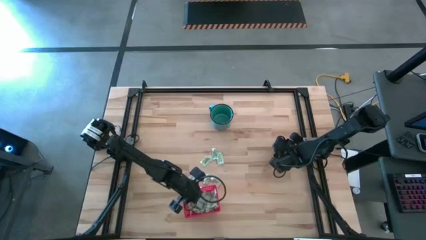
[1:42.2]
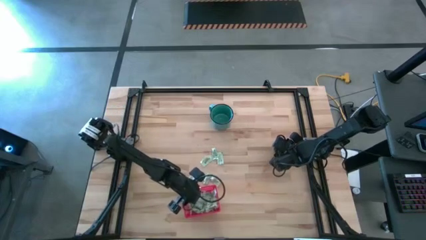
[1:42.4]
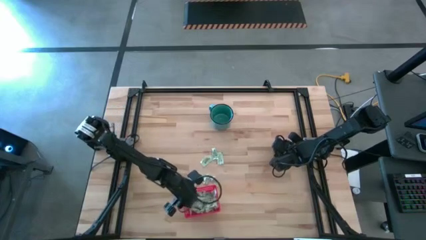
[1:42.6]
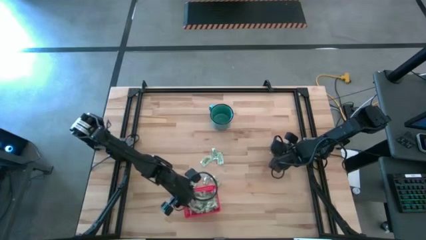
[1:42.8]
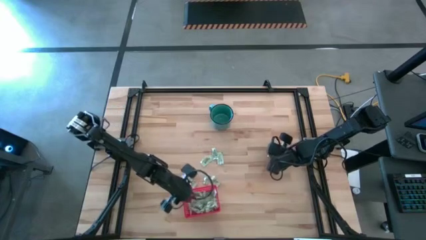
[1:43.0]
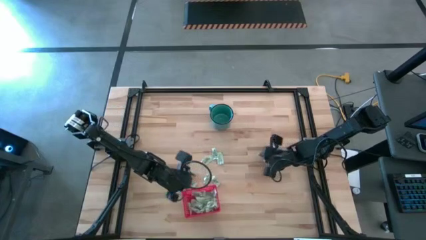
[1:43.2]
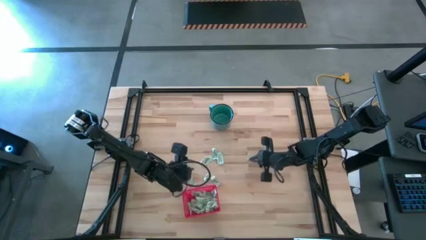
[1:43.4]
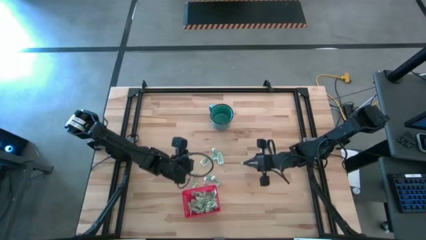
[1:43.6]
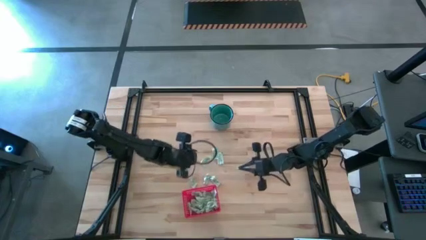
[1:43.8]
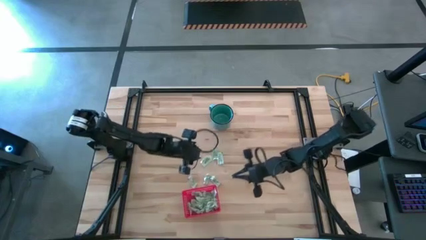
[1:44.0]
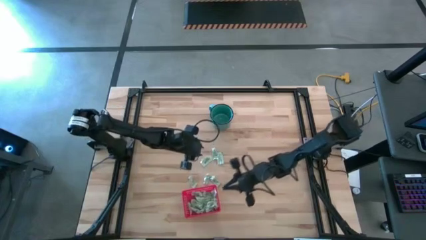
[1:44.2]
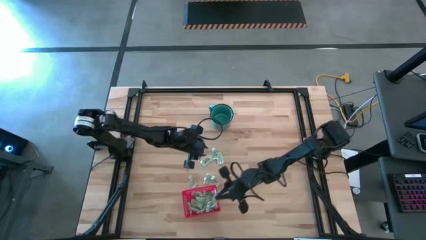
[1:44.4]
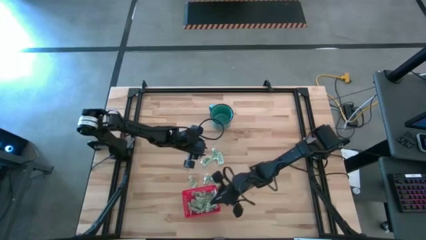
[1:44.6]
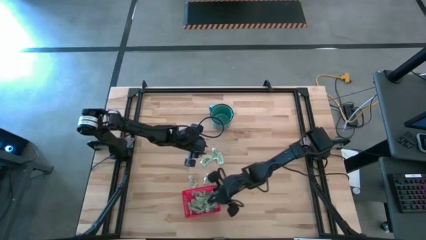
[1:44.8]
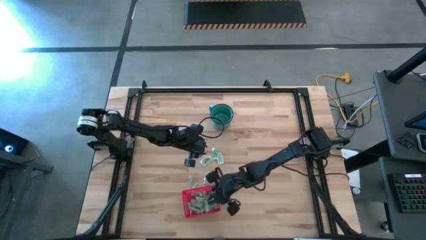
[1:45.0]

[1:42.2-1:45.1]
Task: Pick and place items into bin
Put the green stevia packet into the red bin

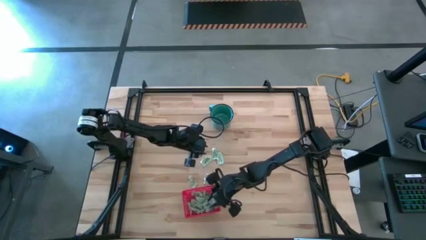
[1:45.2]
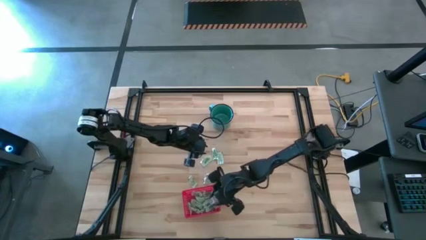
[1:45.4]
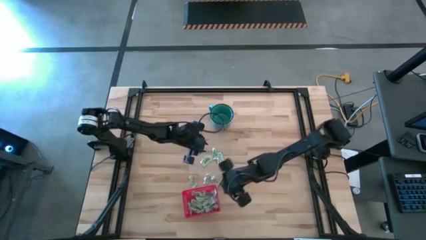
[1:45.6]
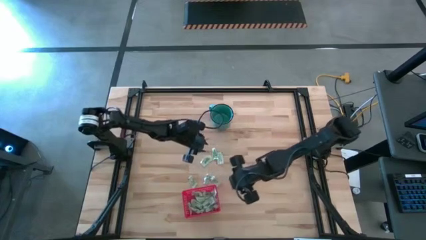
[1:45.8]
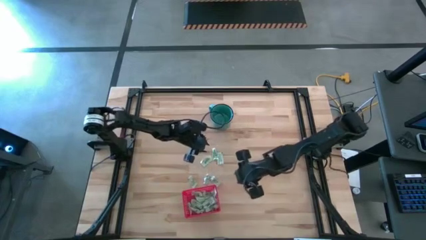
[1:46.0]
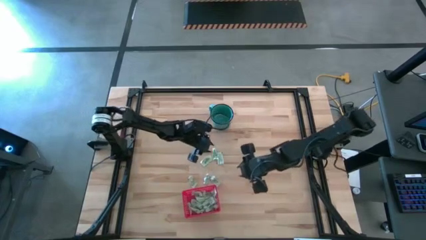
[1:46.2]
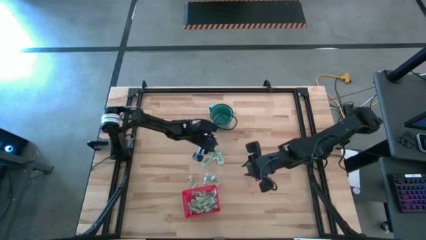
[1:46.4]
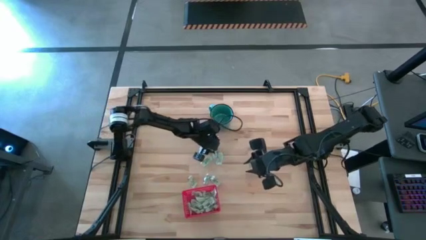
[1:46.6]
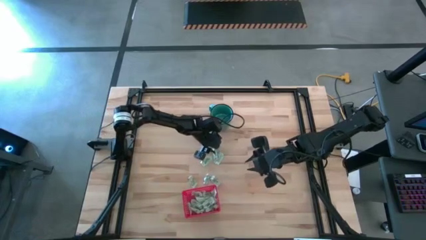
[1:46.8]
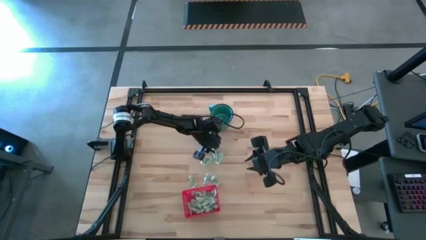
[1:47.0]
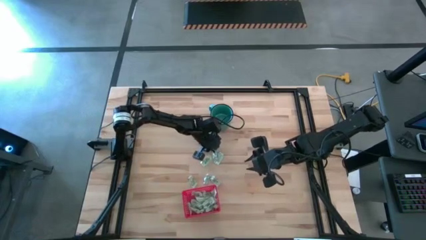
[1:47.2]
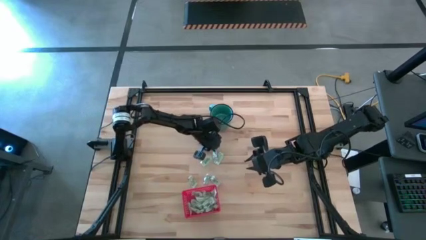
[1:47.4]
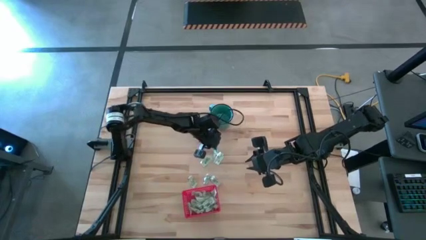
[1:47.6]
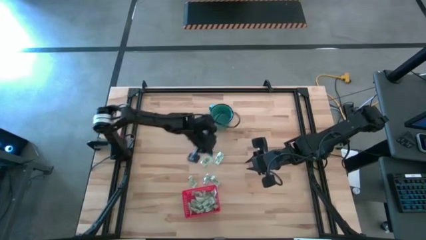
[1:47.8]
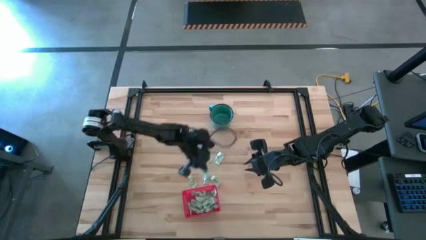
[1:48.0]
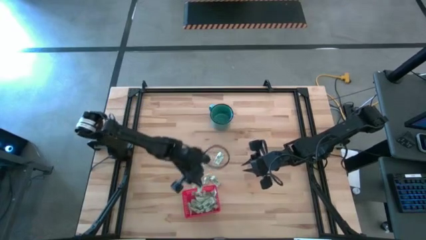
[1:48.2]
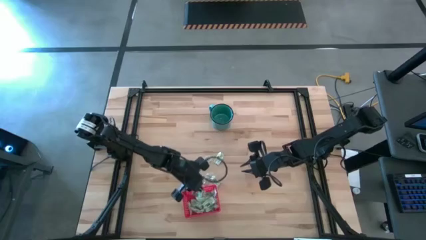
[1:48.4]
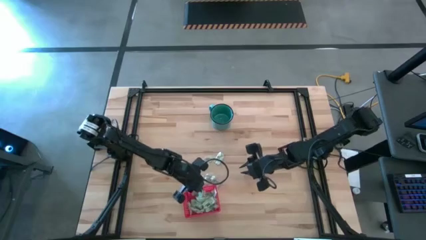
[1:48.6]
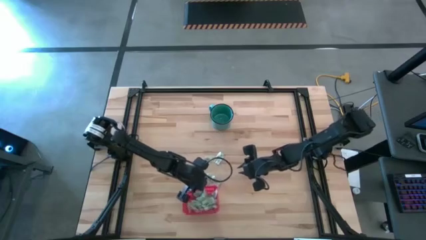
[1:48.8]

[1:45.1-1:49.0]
Put the green stevia packet into the red bin

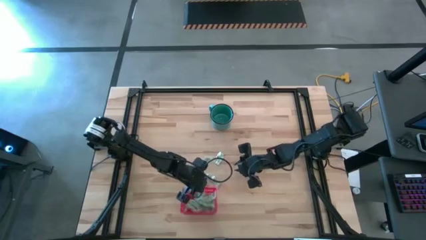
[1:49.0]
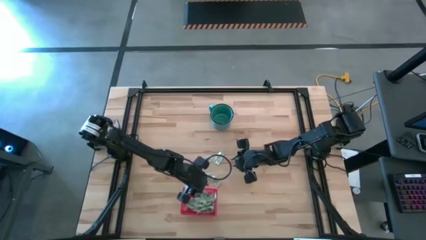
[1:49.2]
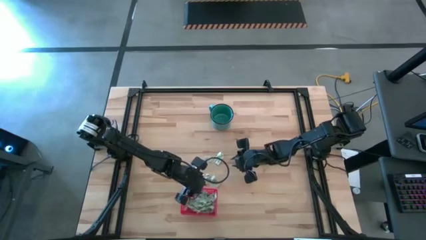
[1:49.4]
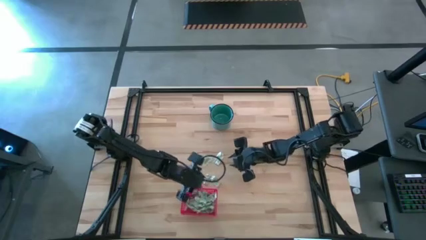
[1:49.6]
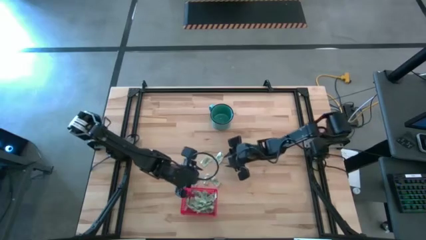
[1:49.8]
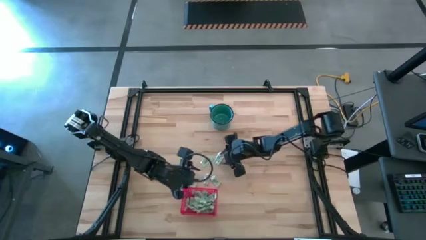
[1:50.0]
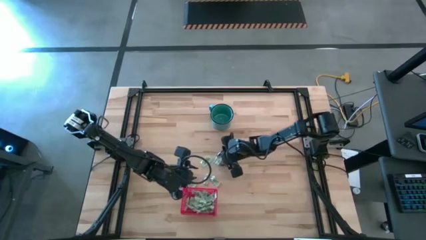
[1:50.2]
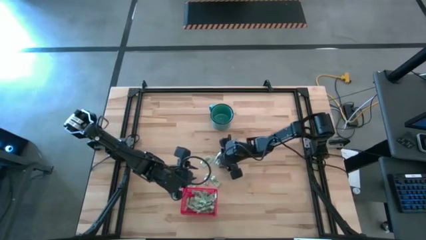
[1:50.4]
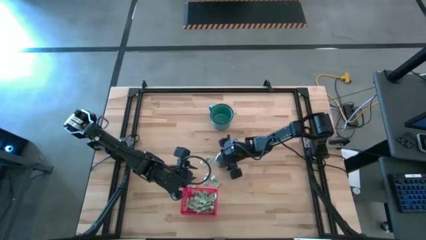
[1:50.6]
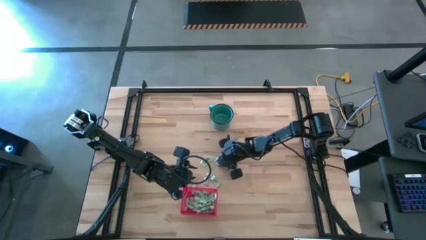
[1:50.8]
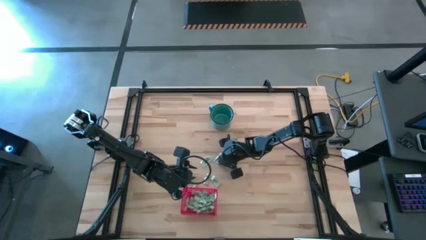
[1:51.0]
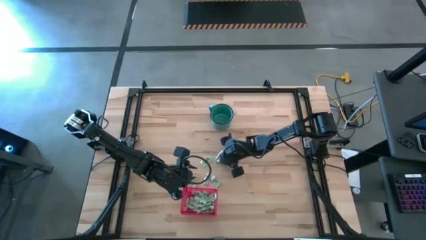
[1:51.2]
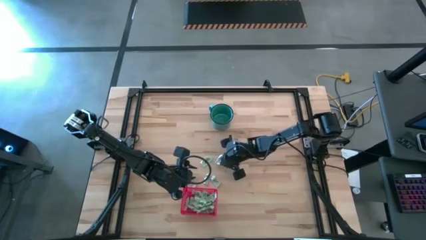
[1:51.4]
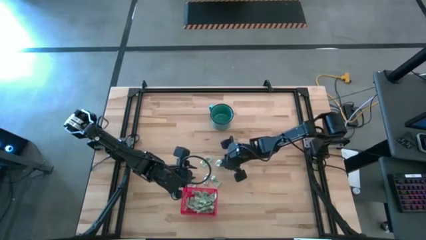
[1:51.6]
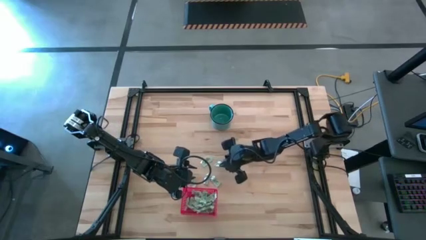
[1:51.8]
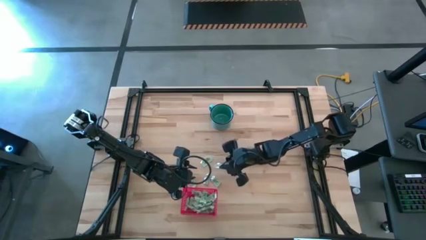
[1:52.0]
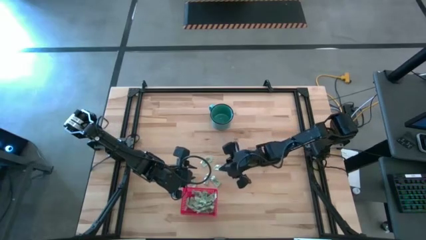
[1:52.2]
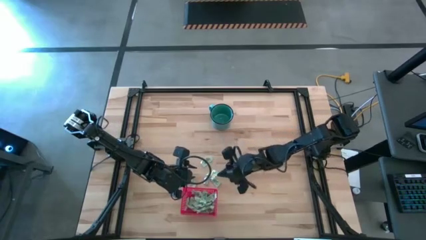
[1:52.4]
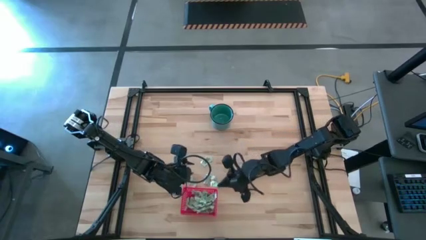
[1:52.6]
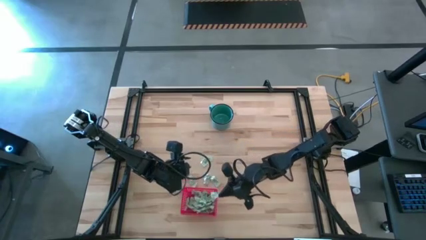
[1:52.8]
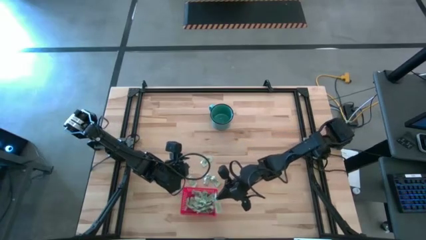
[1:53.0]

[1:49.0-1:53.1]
Put the green stevia packet into the red bin

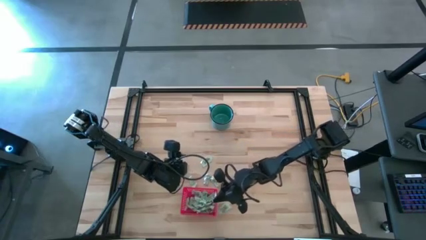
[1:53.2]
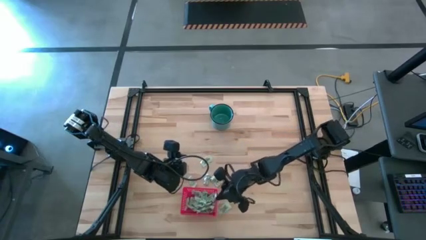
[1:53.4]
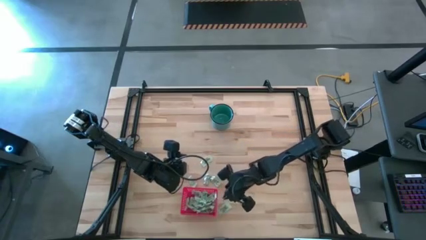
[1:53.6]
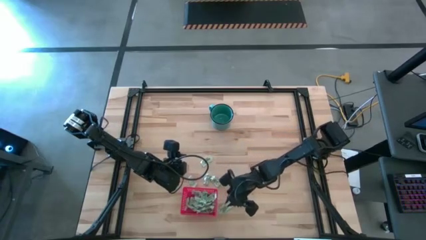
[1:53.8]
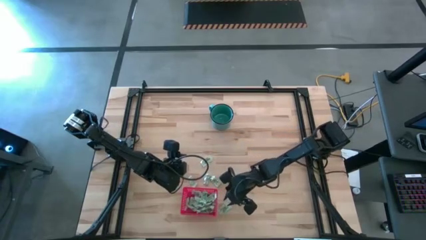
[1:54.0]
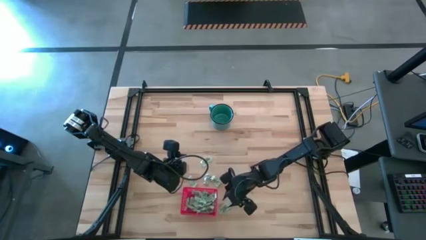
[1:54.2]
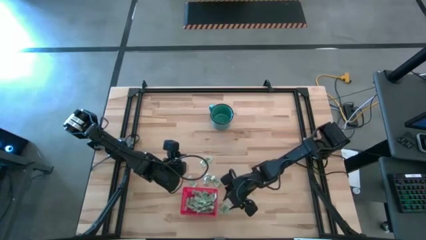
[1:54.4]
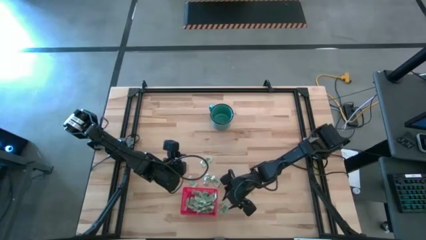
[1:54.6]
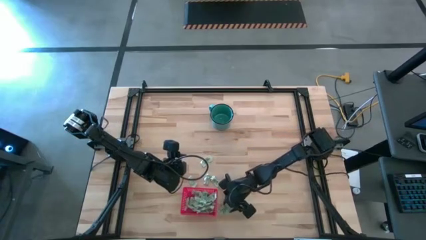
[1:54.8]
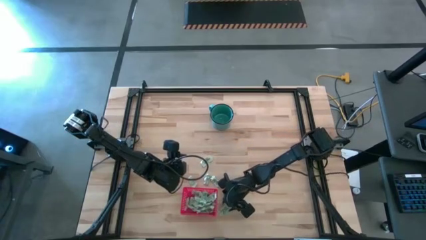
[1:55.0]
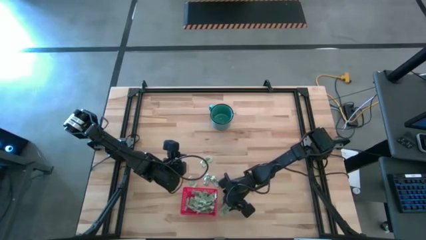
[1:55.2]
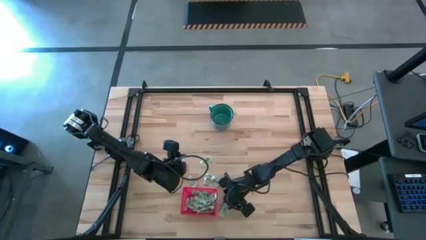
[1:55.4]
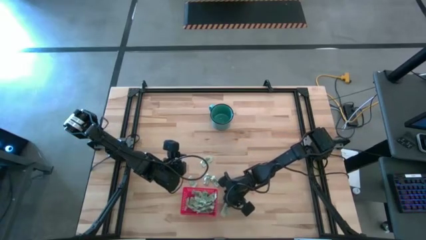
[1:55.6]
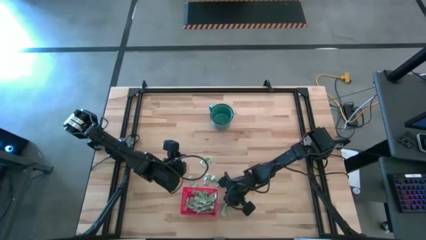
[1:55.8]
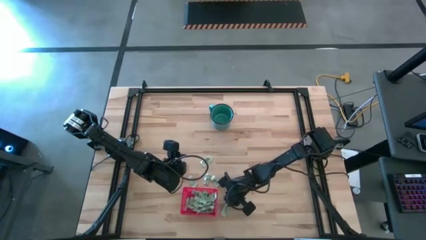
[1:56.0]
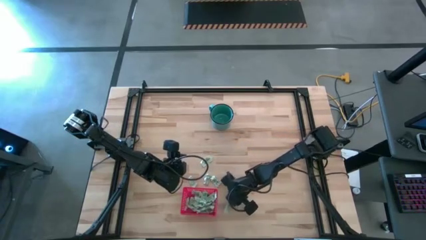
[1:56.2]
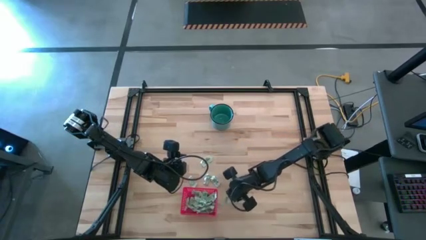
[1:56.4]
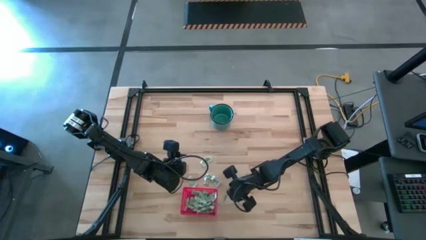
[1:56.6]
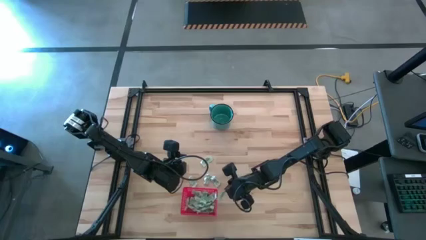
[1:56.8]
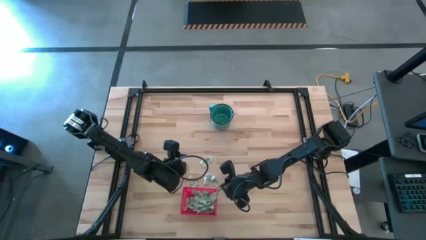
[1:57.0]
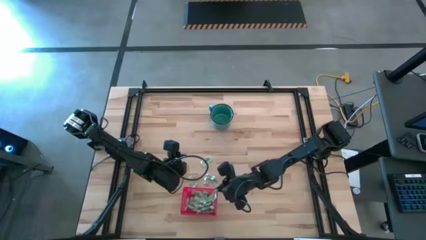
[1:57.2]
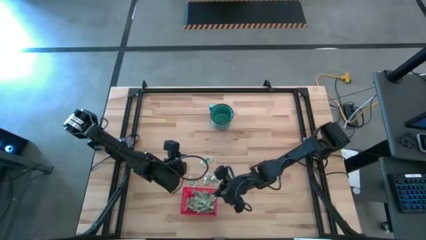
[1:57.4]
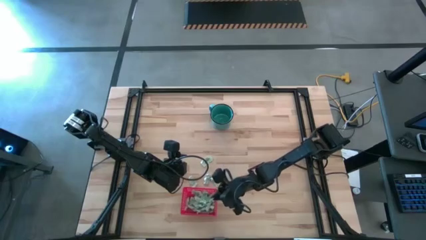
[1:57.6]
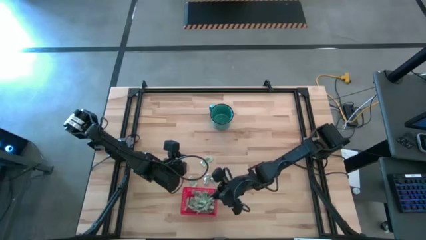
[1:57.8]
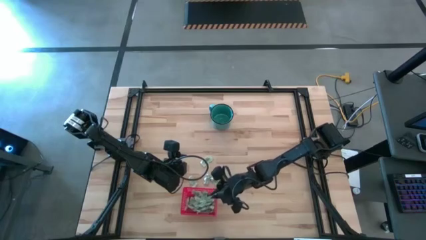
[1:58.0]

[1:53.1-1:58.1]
Put the green stevia packet into the red bin
